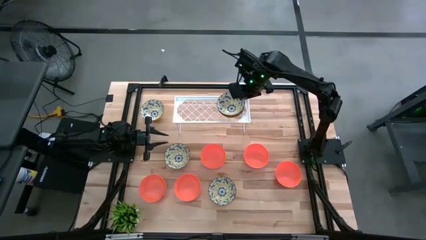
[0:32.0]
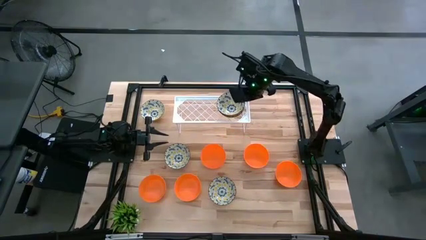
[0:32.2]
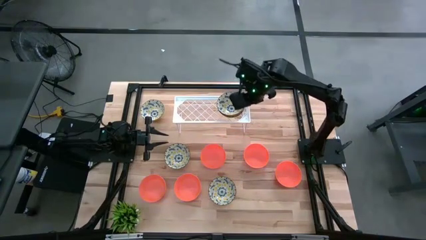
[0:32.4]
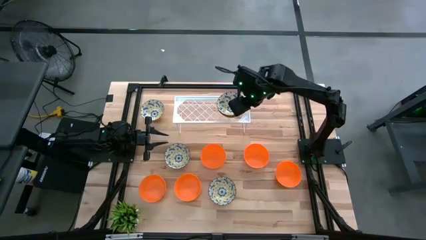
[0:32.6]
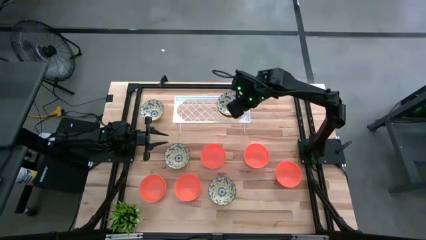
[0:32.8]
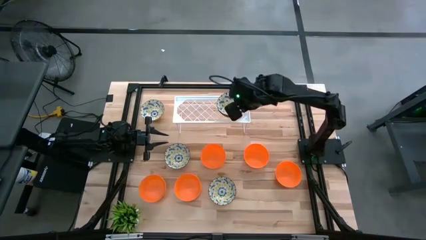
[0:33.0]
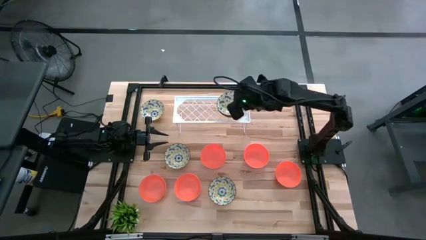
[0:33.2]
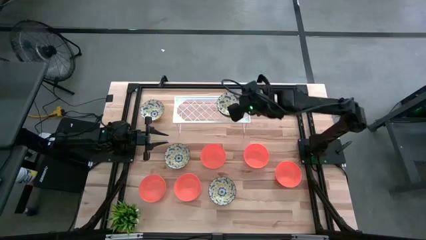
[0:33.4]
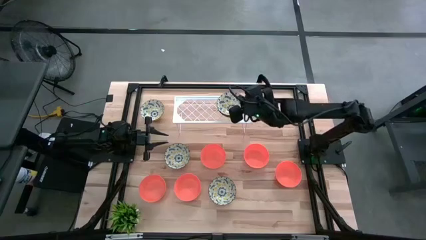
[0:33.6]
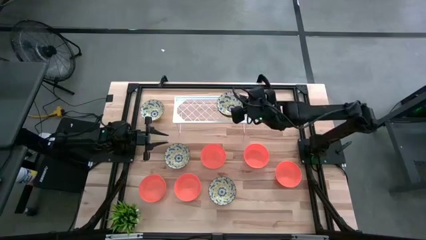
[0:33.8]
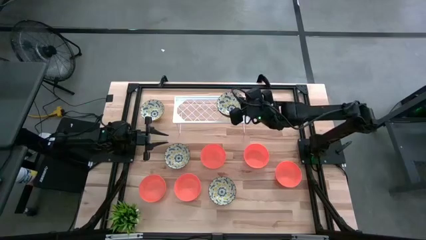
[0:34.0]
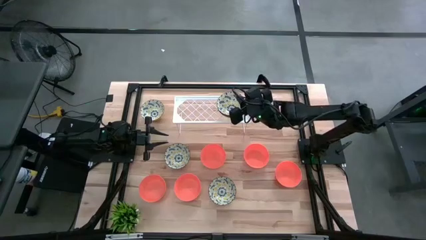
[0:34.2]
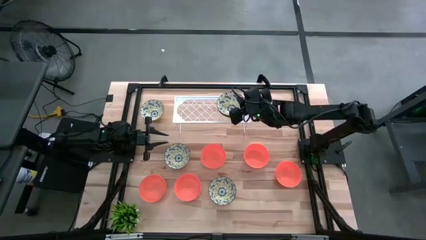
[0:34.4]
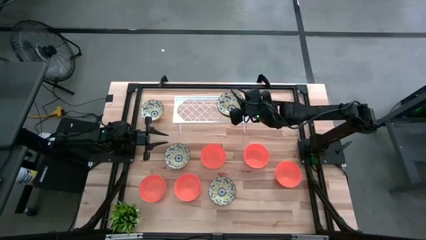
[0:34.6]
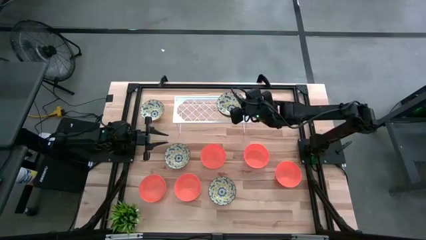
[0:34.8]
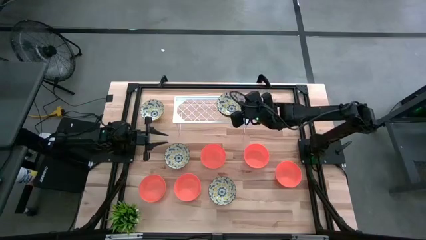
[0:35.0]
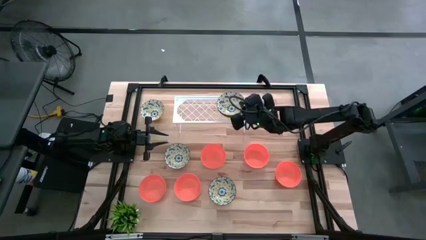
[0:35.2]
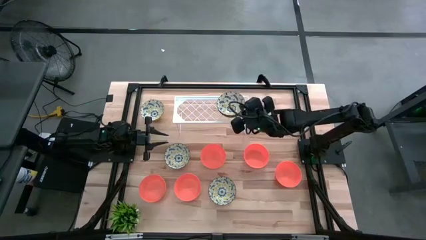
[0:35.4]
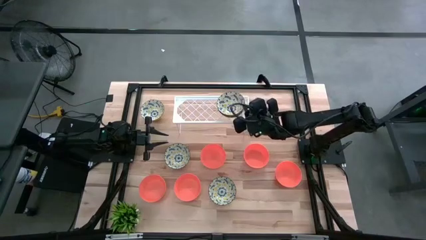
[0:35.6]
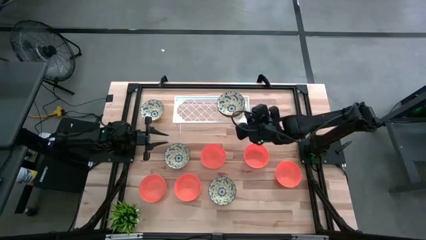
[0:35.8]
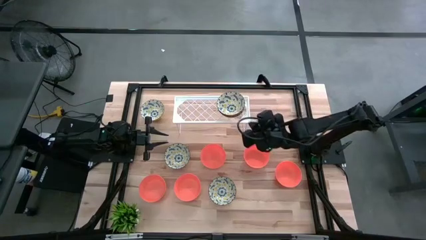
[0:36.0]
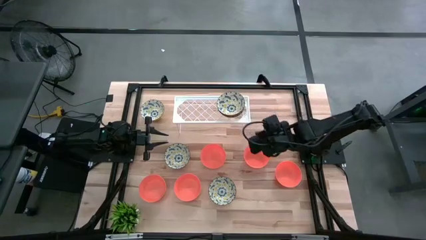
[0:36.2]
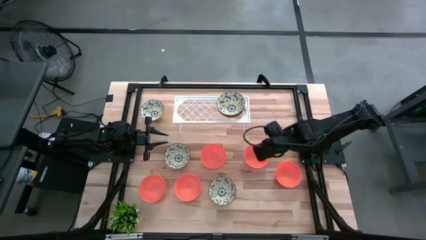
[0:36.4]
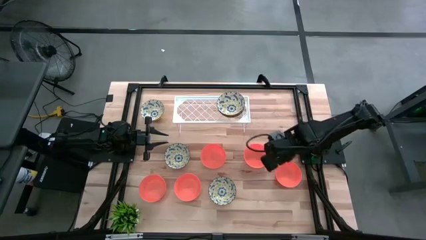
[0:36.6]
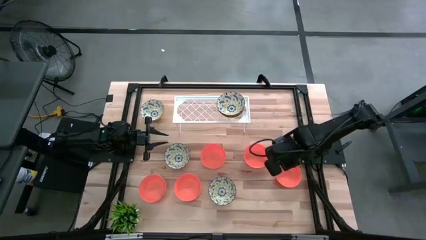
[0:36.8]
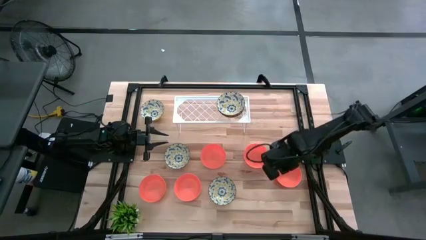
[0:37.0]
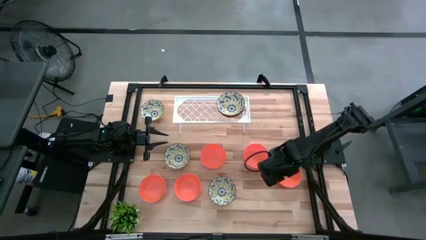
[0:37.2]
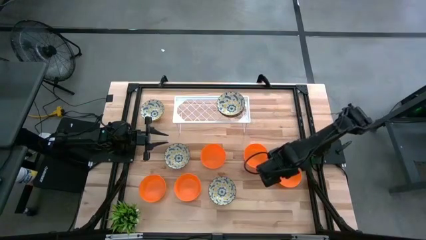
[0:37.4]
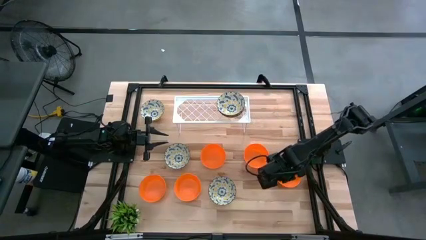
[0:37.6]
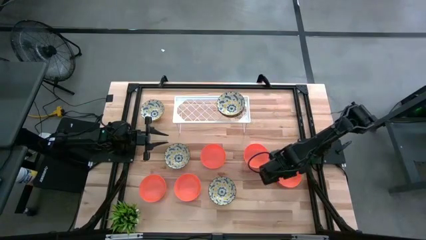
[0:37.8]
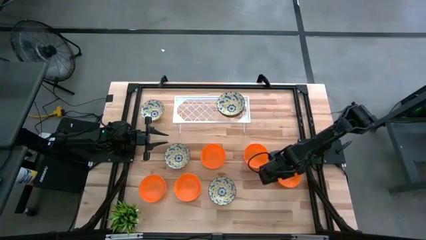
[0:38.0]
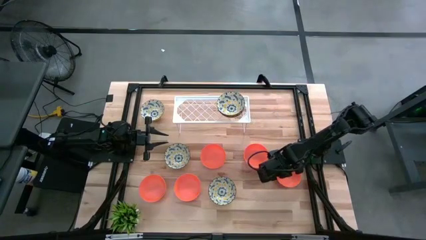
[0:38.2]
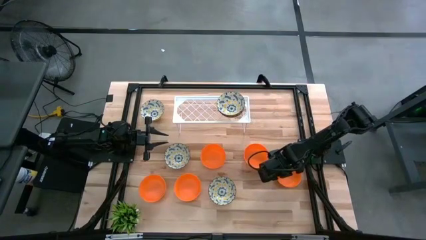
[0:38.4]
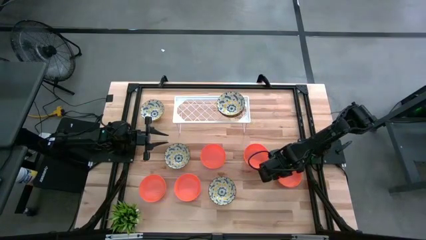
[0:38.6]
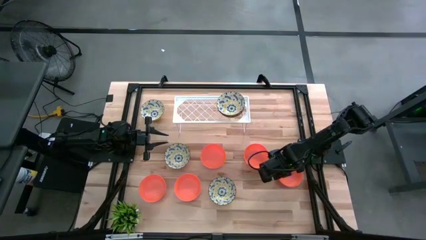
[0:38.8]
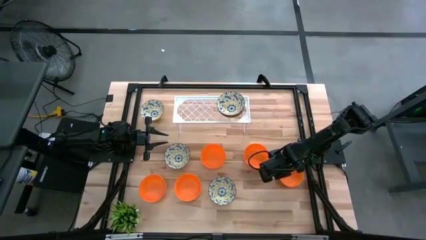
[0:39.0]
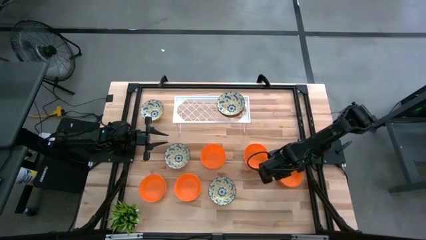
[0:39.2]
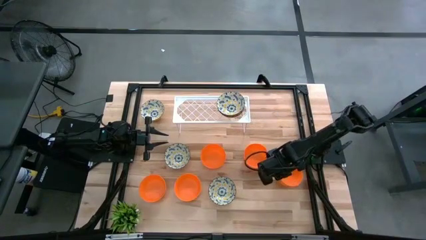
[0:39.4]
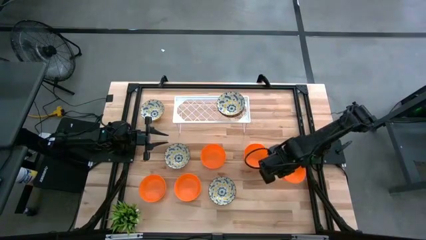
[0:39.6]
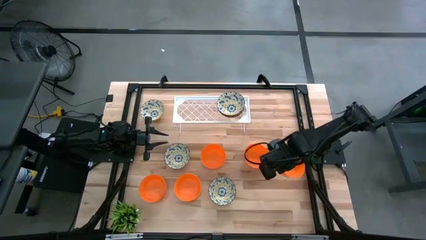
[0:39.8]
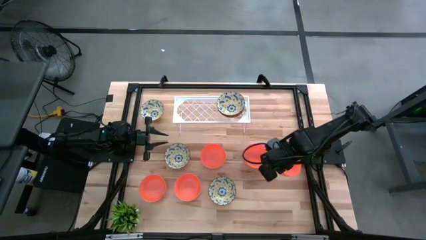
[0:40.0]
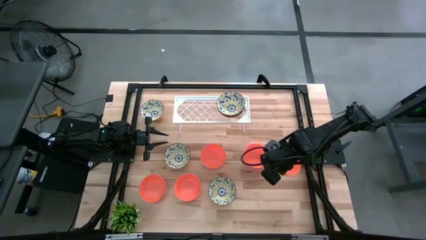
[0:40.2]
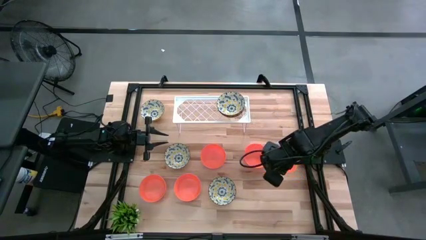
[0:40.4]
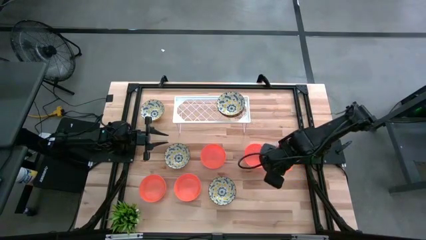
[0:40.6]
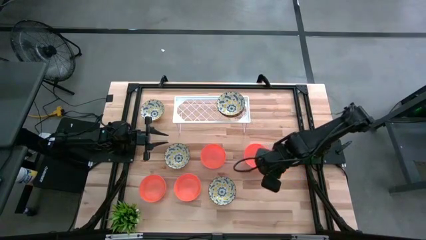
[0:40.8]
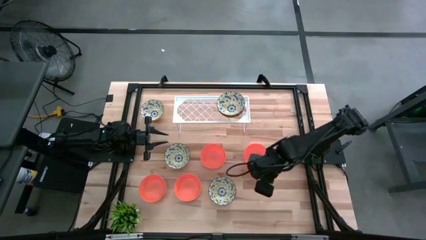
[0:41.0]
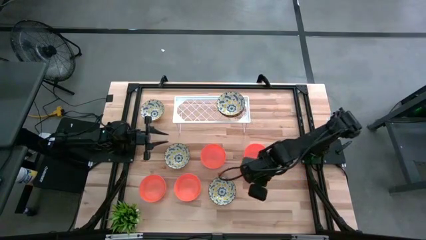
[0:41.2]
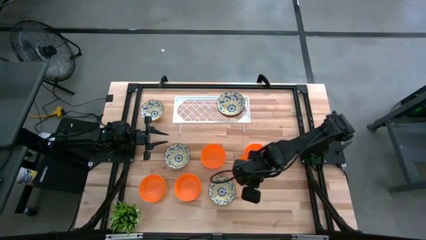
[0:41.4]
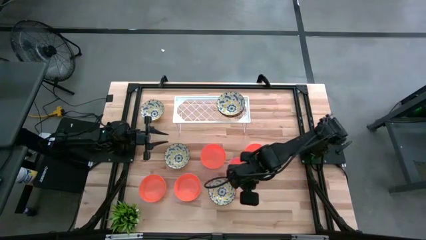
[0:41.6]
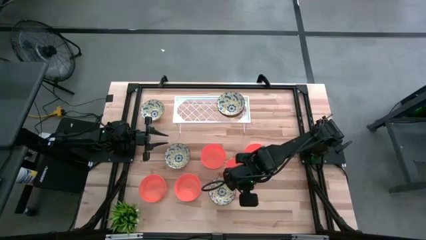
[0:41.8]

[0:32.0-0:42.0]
Task: Pick & Place Mini bowls
Put the orange bowl on the shelf
